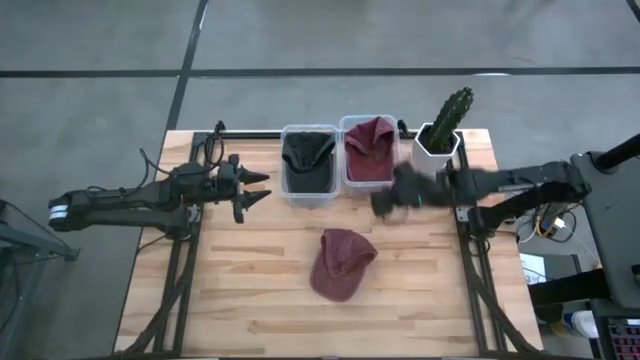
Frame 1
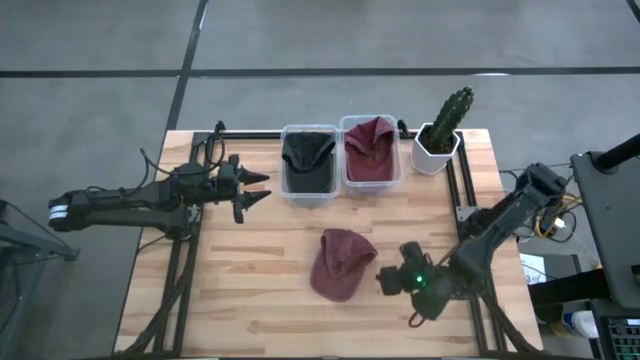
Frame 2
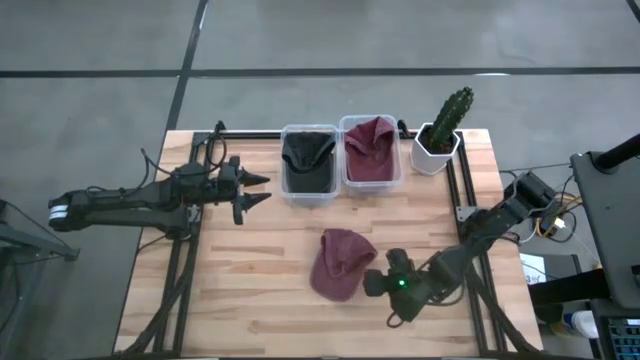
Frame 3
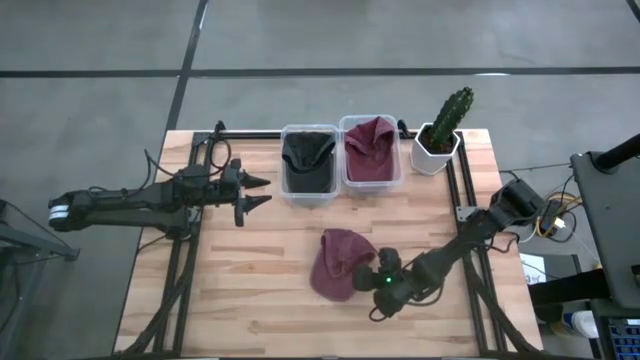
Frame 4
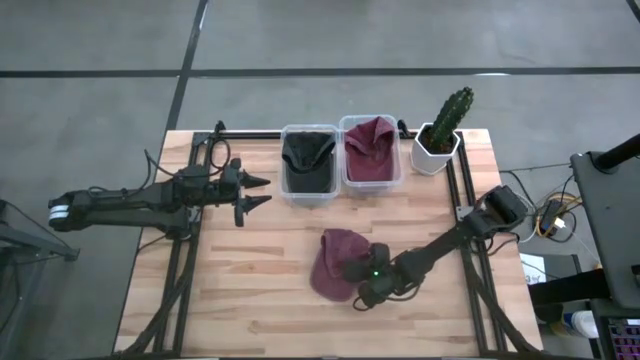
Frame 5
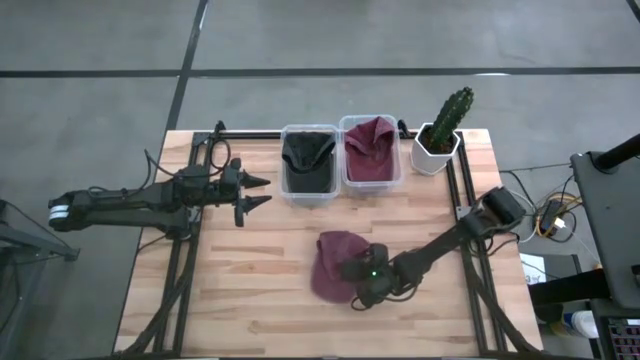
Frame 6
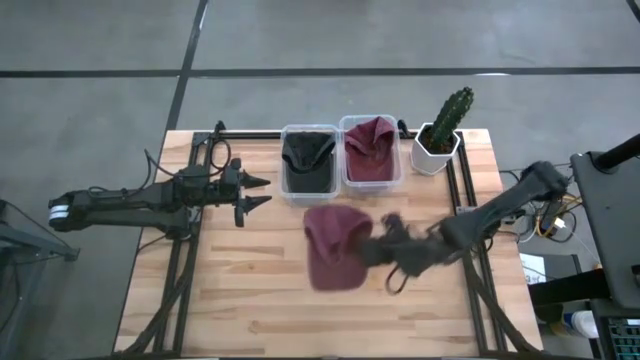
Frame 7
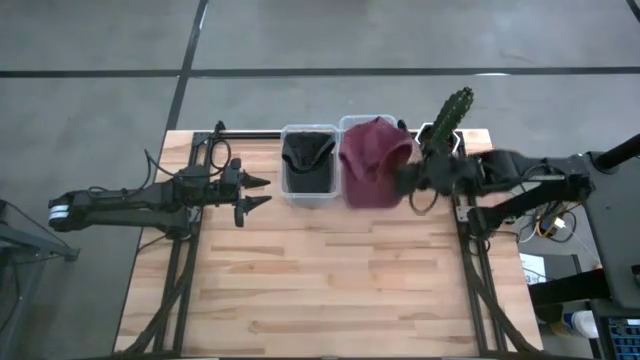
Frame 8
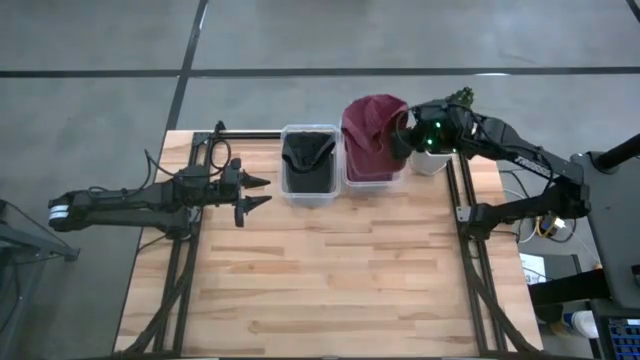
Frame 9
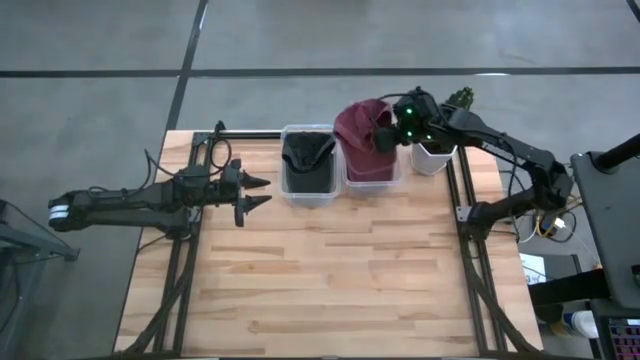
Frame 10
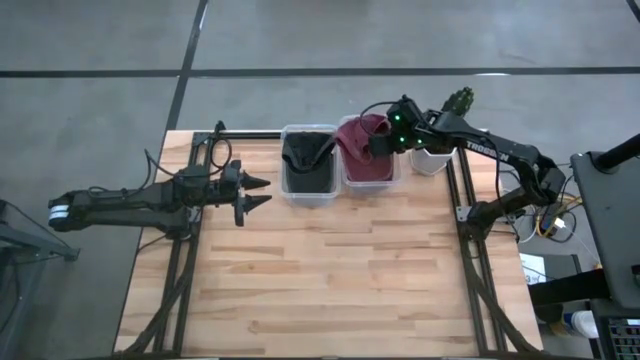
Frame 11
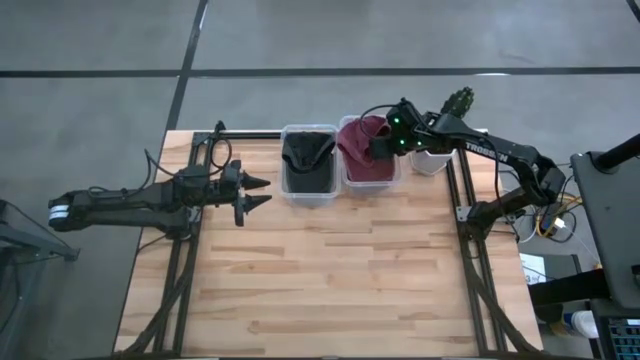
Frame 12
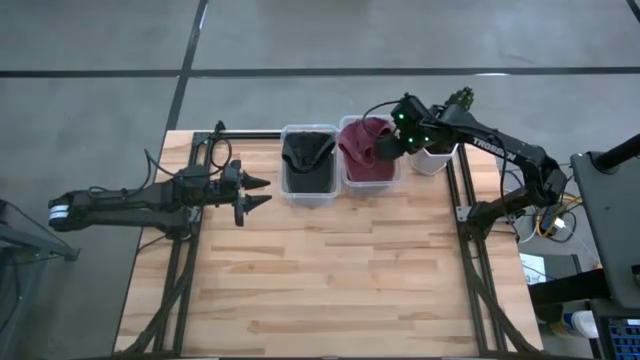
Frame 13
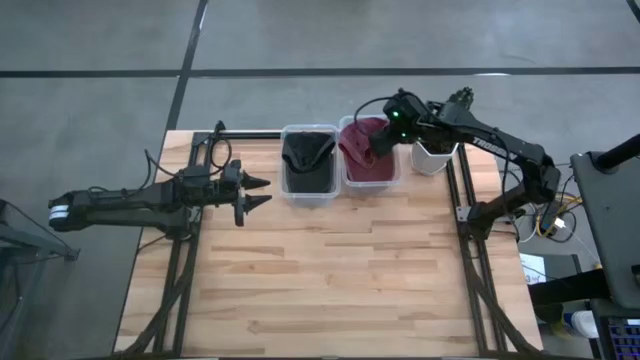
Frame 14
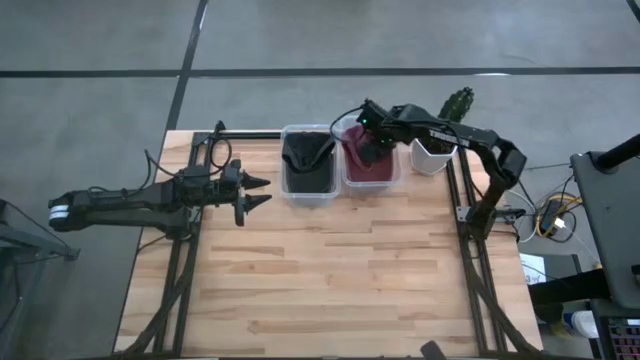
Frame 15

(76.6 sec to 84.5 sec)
Task: Pick & Place hat
Put the red cap into the right transparent bin

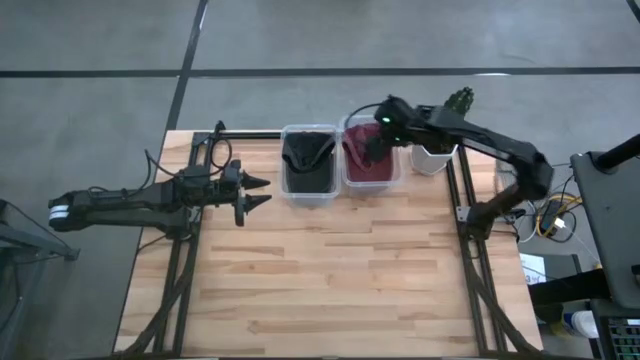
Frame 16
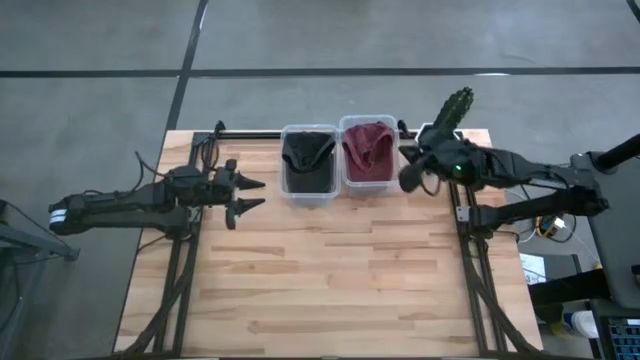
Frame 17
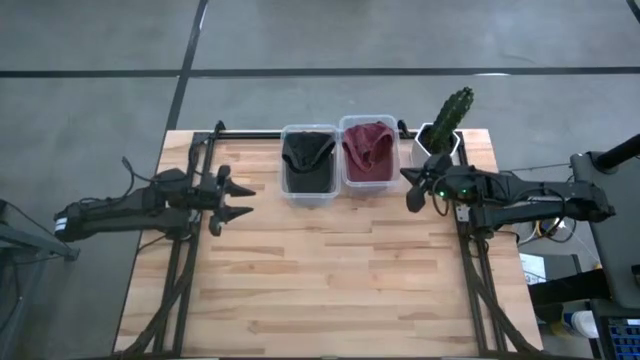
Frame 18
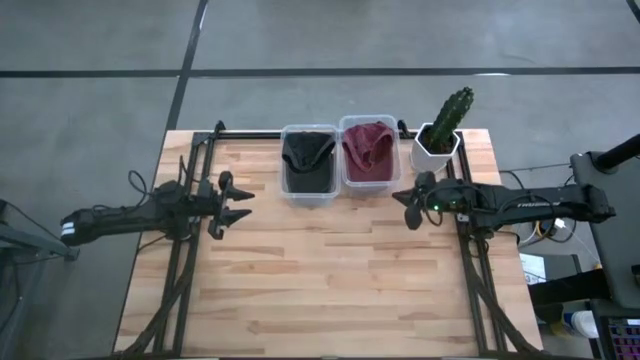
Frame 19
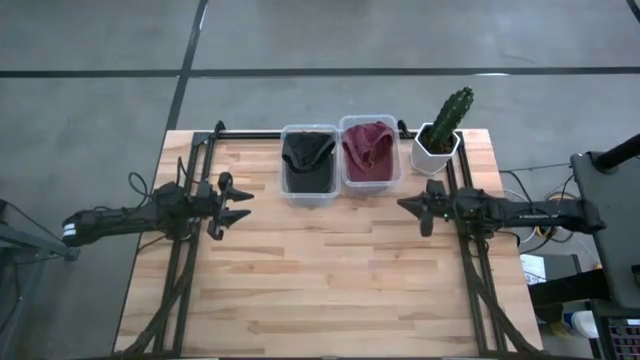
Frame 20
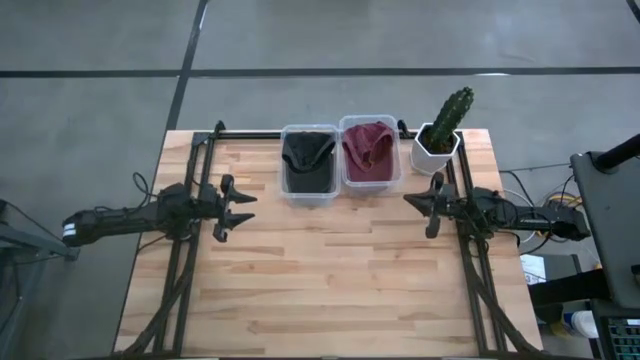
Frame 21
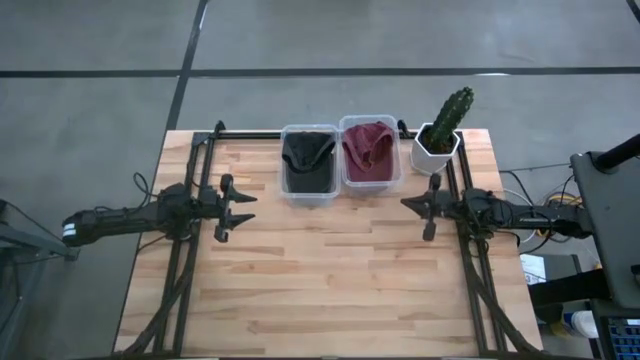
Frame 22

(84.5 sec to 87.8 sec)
Return to Home Position

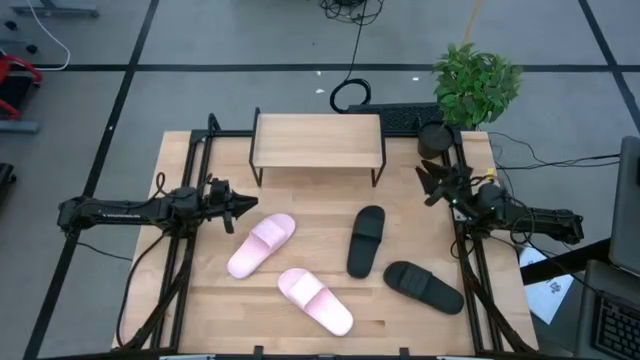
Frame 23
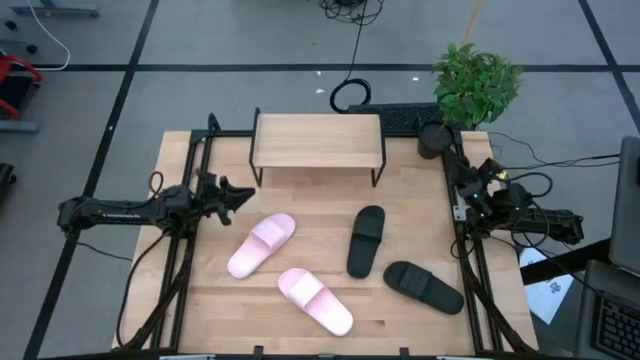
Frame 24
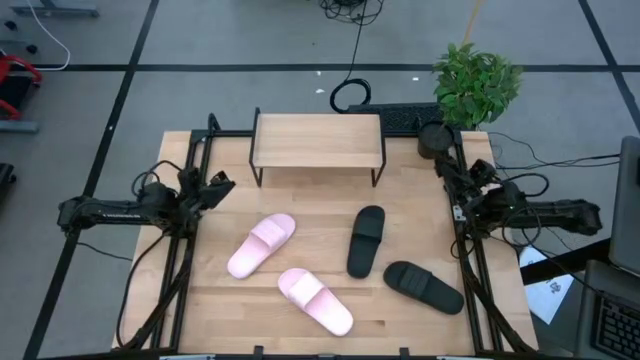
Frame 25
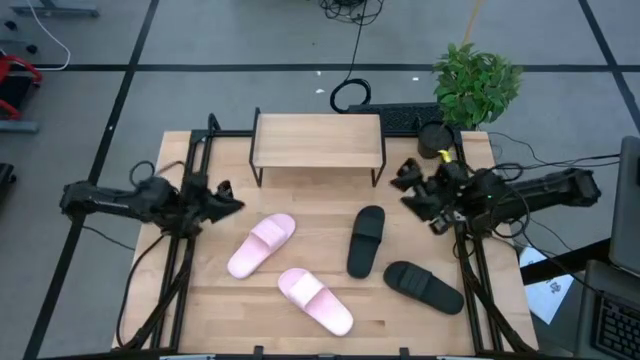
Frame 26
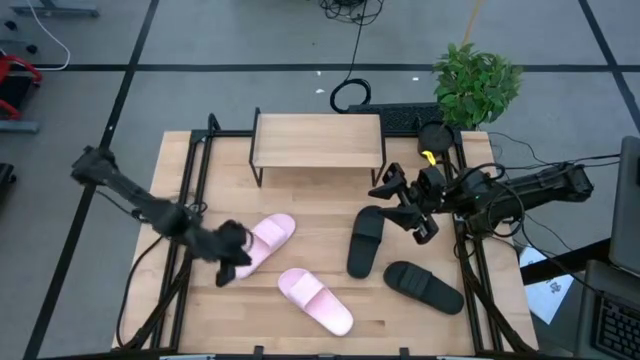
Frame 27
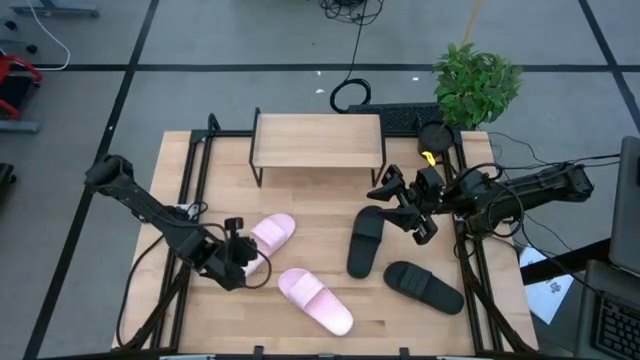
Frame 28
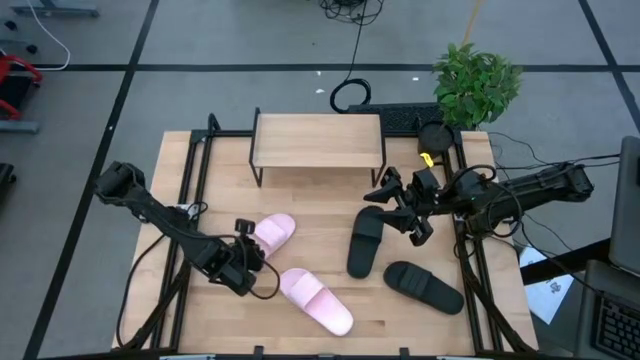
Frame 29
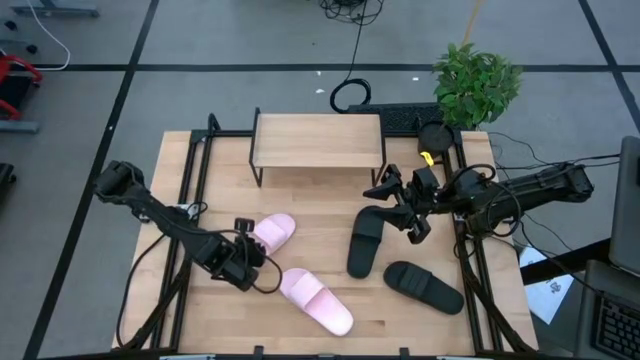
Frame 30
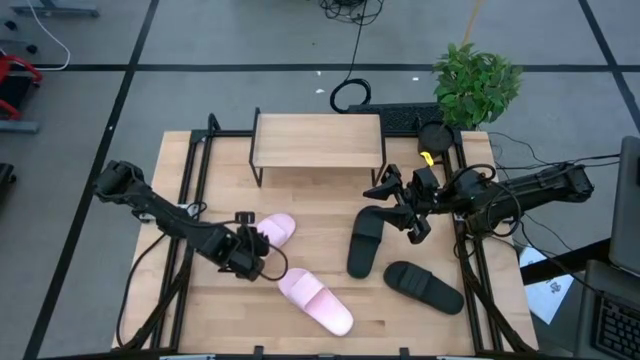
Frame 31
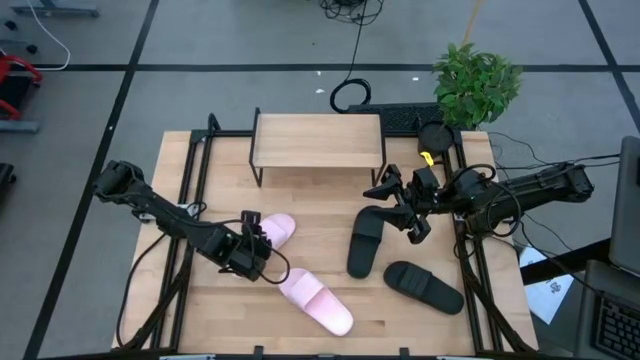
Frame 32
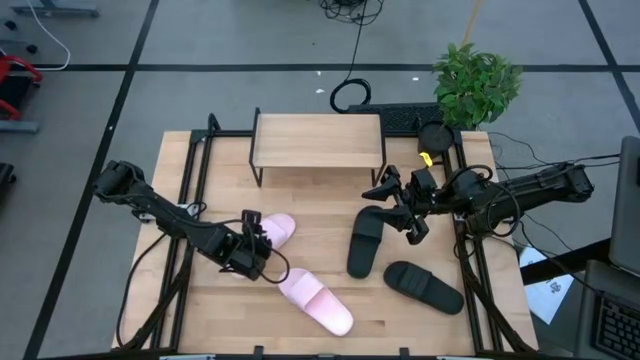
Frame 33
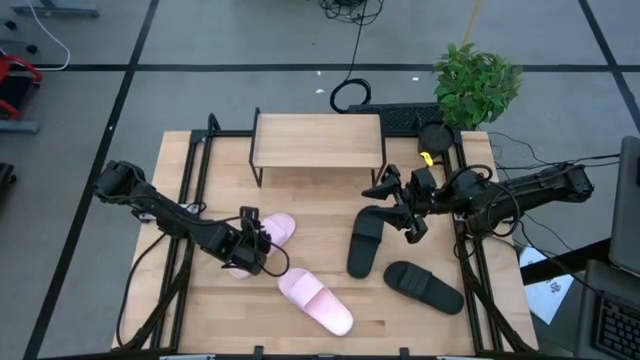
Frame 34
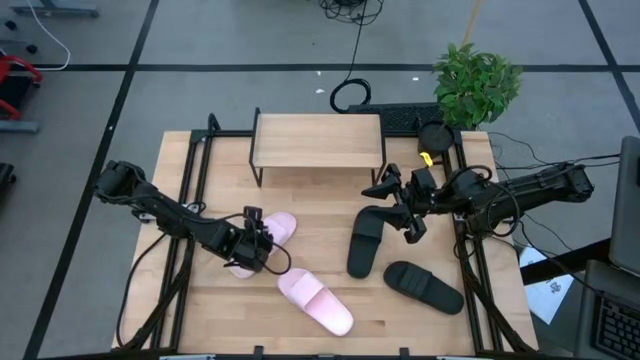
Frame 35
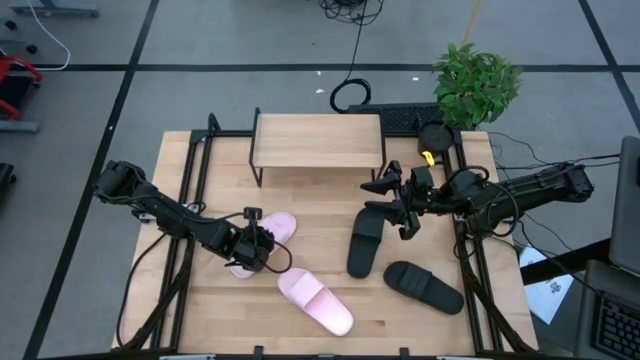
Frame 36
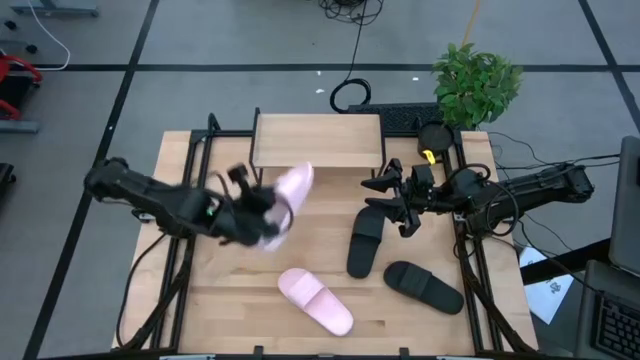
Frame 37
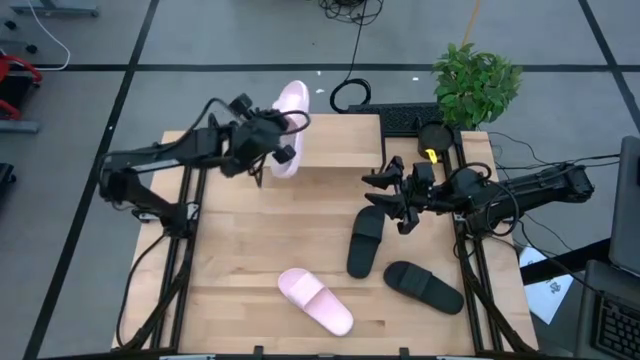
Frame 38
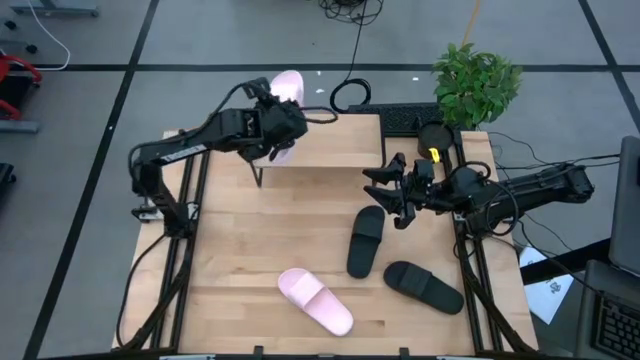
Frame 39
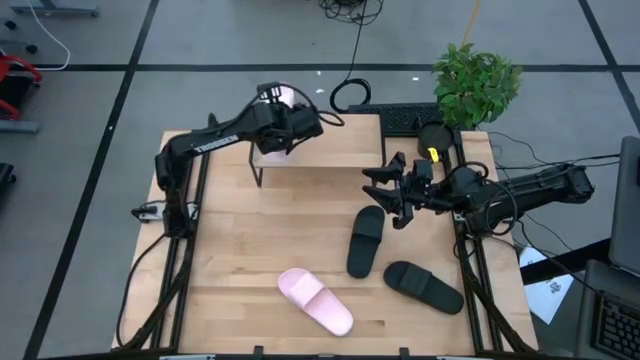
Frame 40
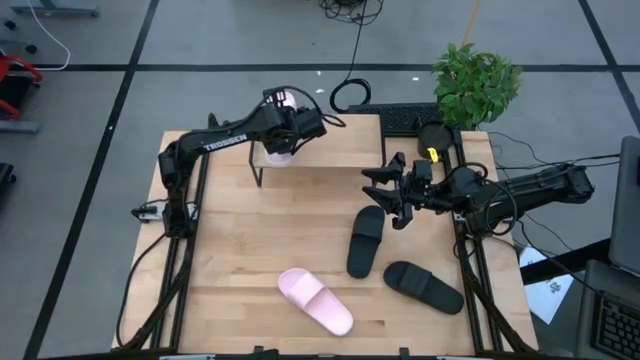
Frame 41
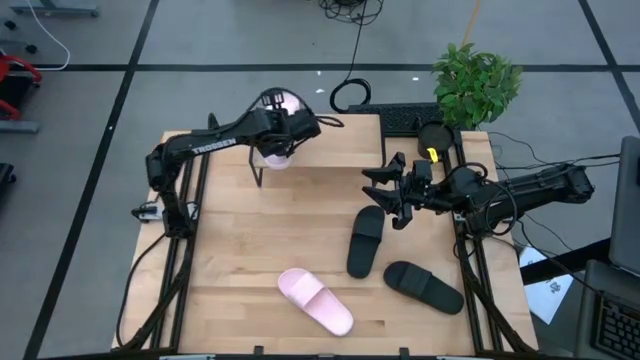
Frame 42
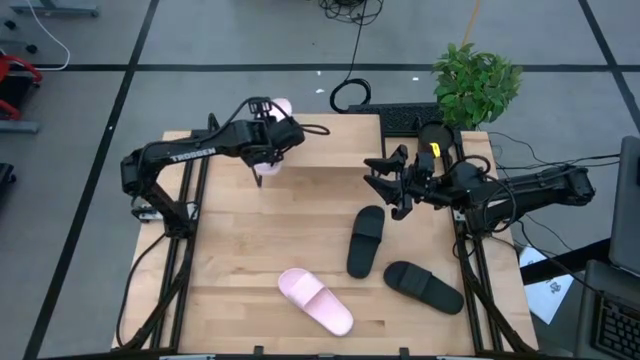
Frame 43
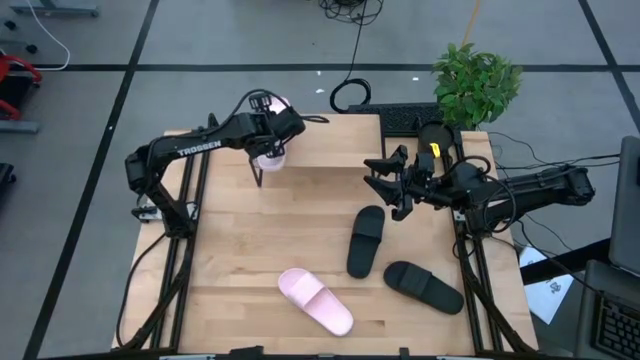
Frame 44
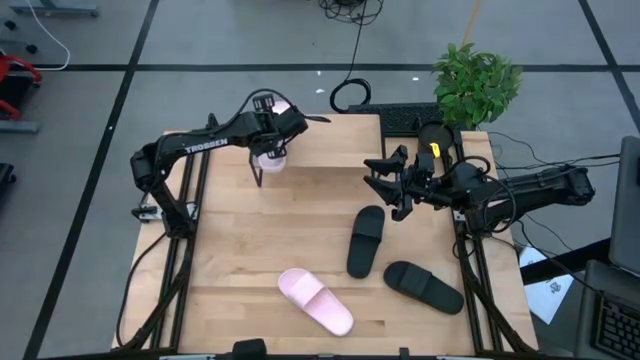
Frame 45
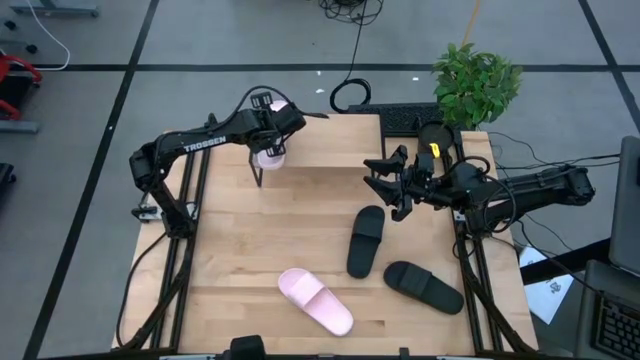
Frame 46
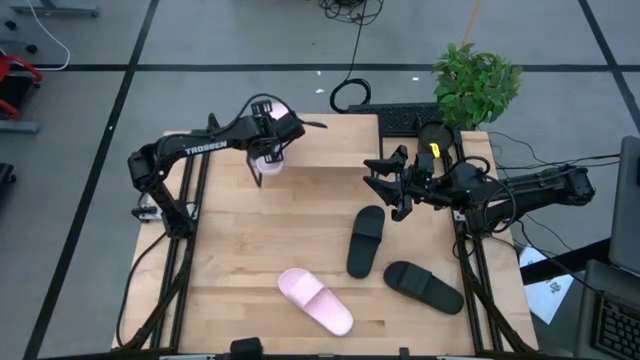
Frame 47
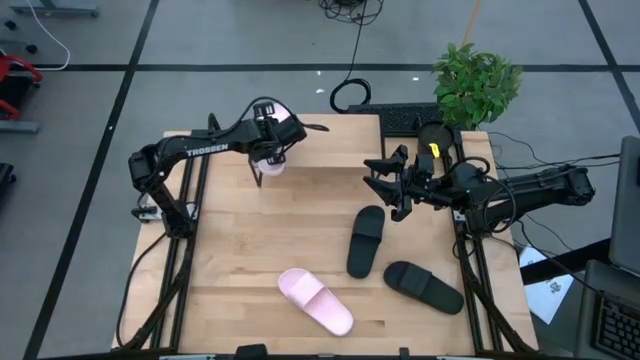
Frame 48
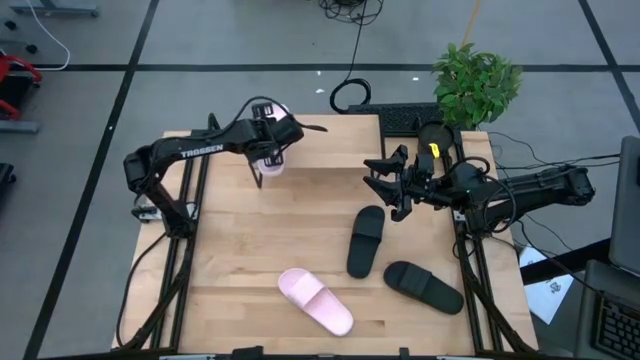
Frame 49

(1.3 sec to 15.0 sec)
Task: Pick and place slides into the shelf
Put the left pink slide on the shelf
